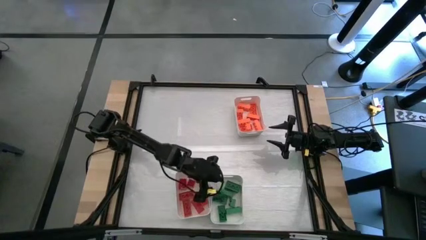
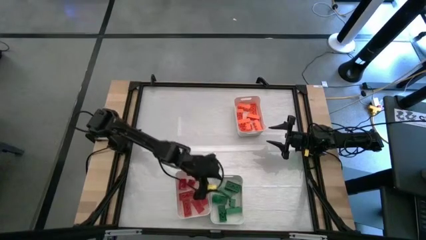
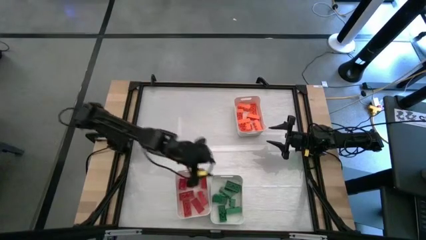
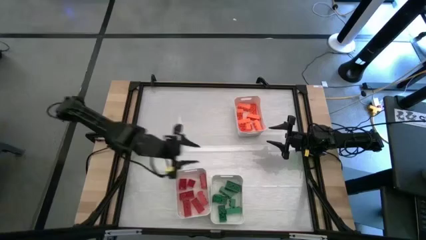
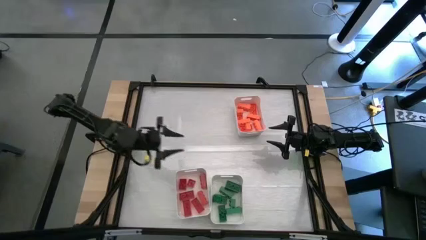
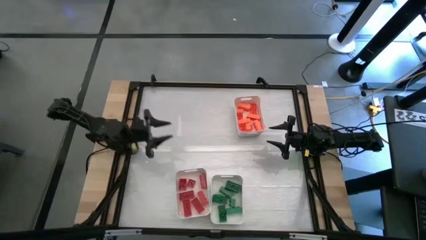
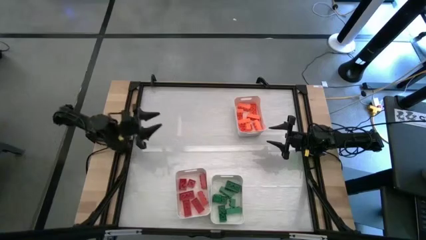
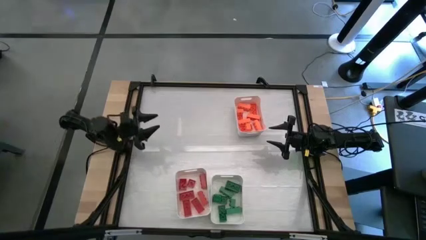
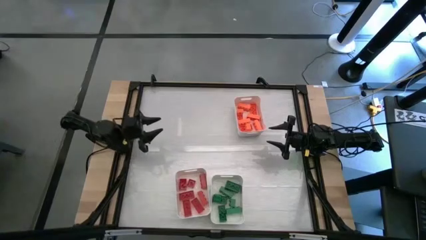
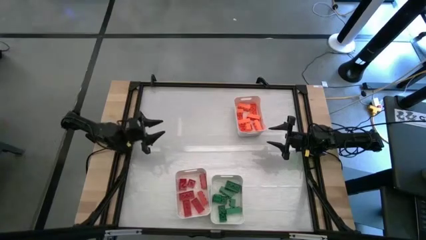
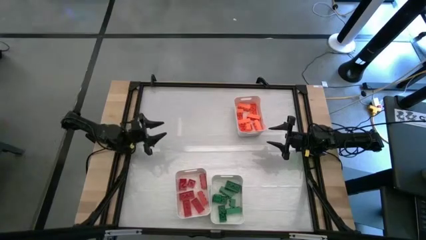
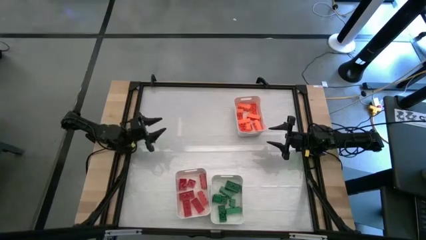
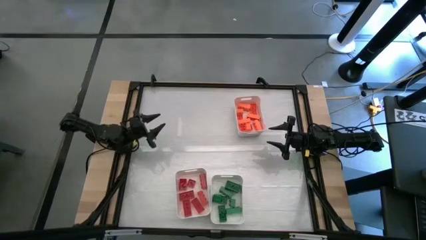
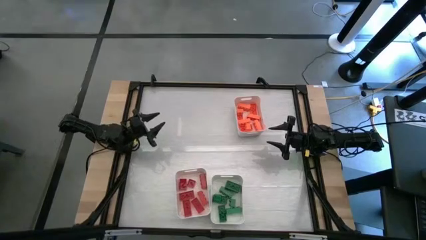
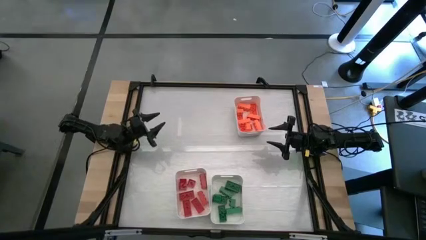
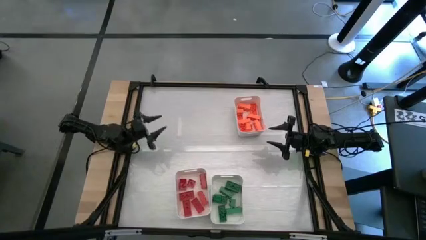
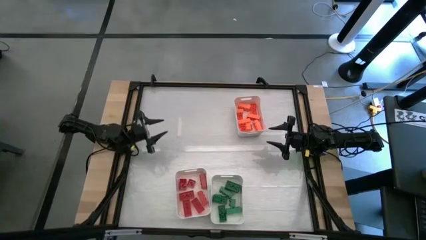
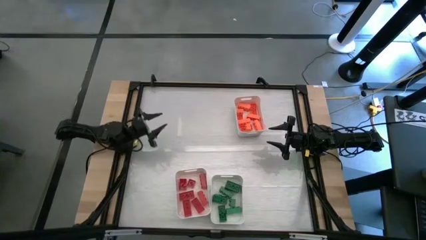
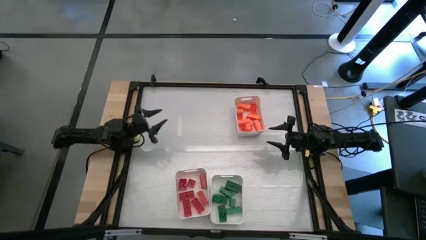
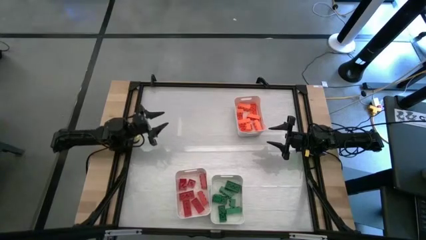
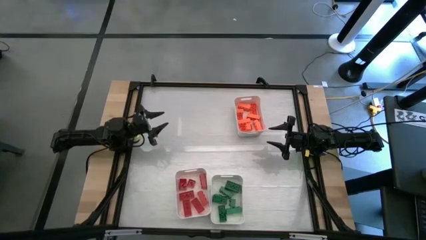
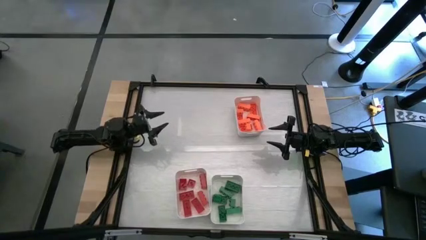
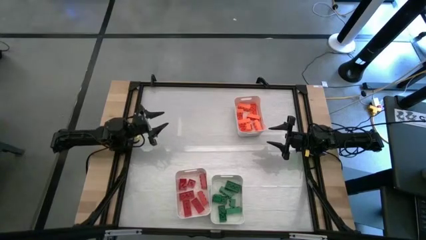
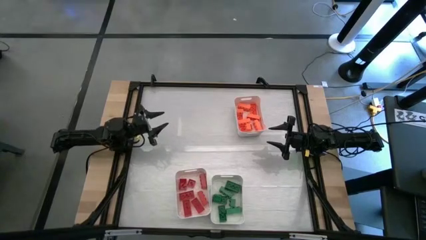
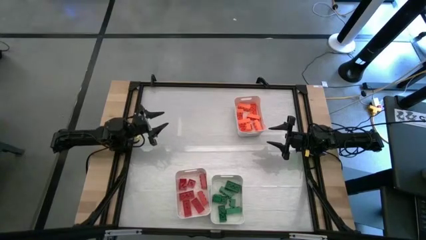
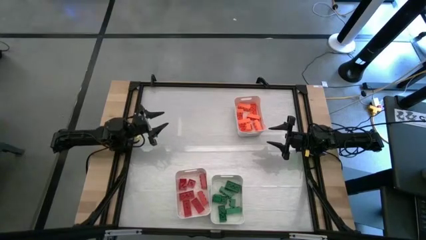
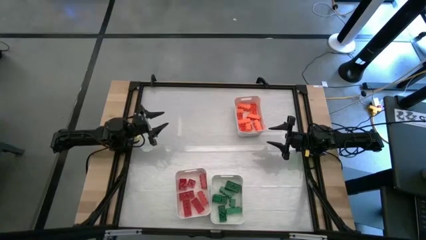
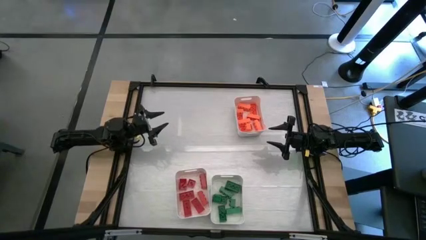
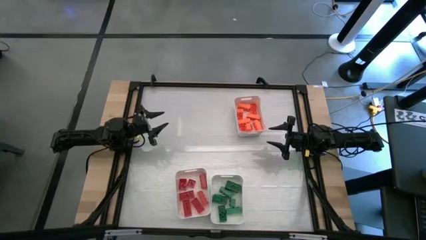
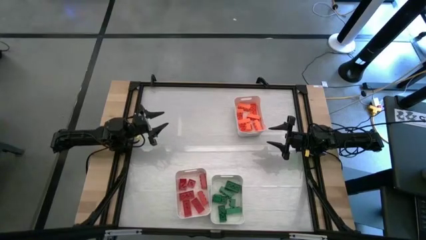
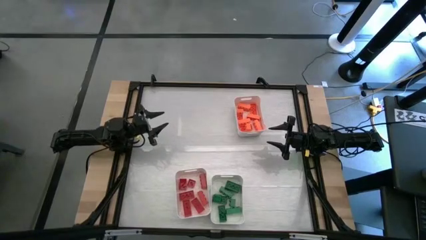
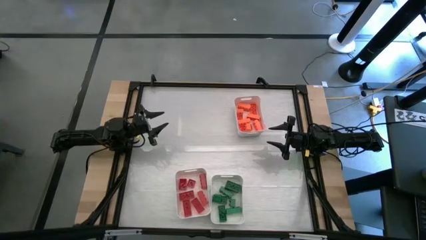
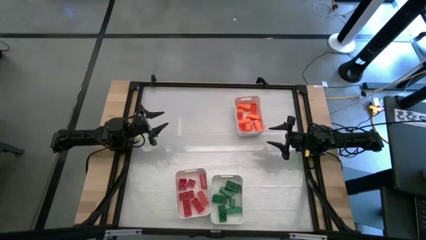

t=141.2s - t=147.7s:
Task: Sort blocks
Return to Home Position

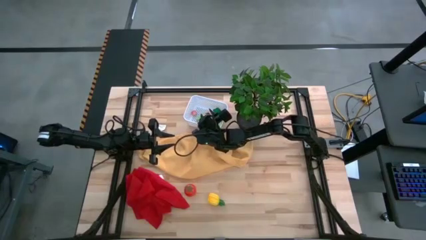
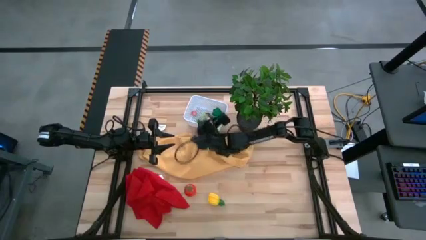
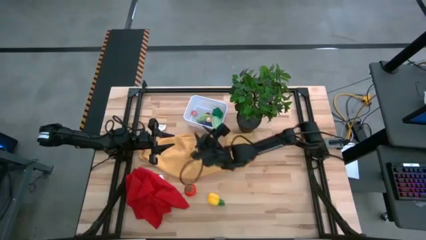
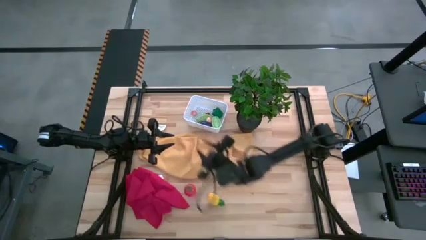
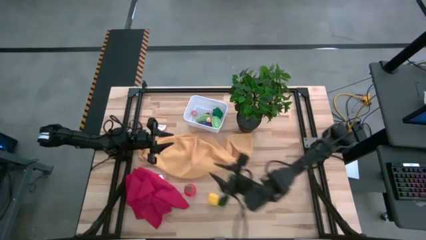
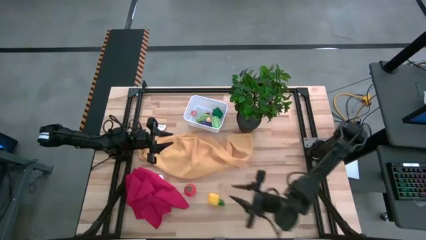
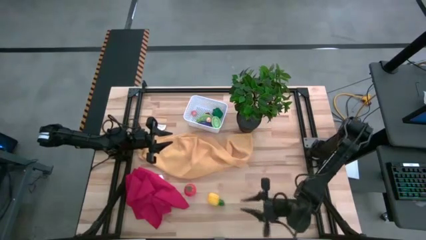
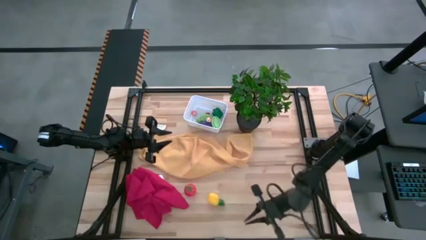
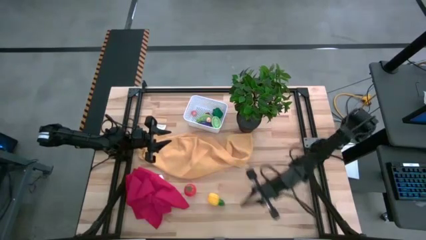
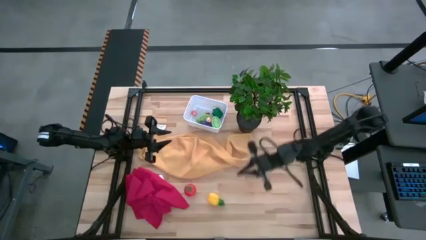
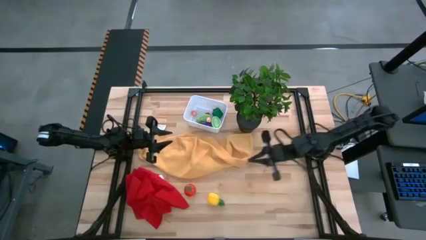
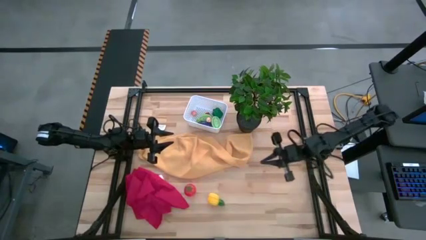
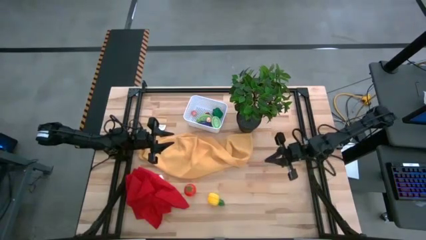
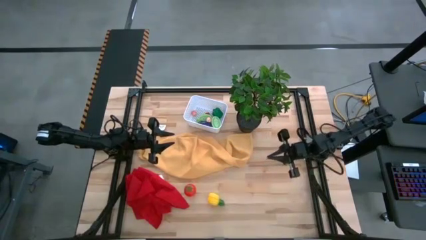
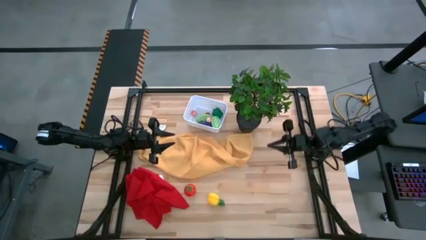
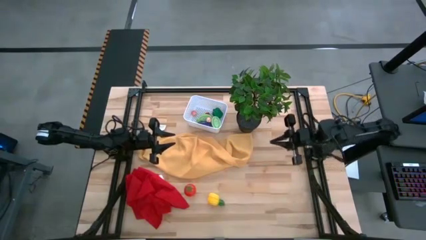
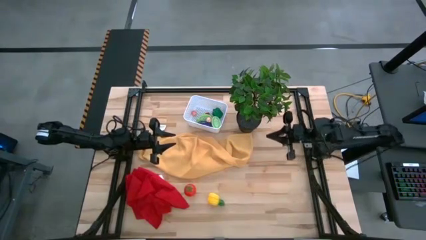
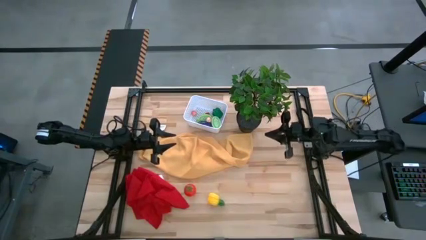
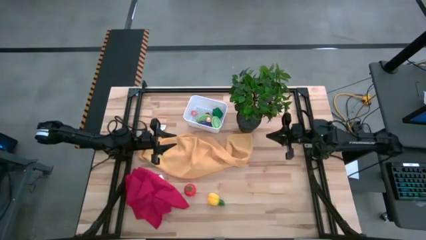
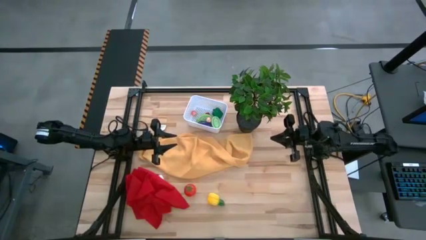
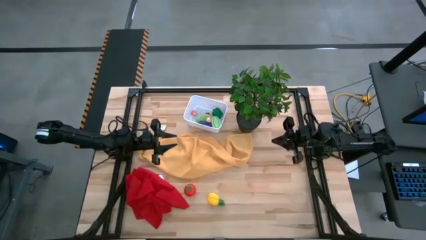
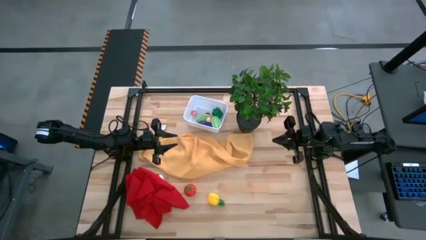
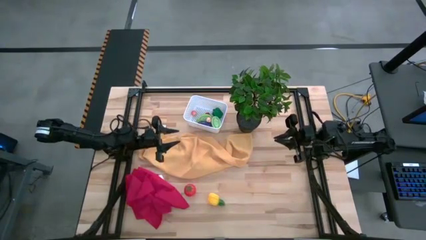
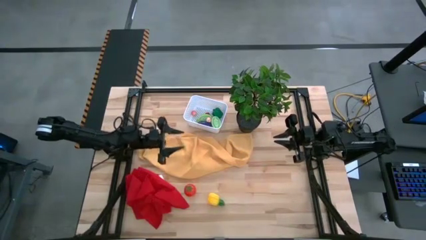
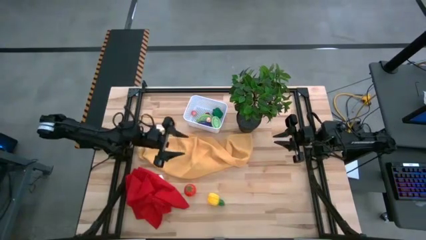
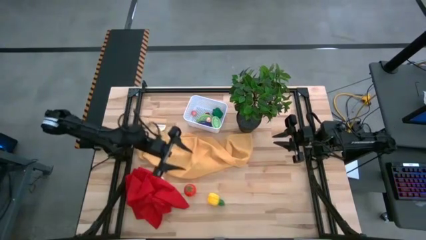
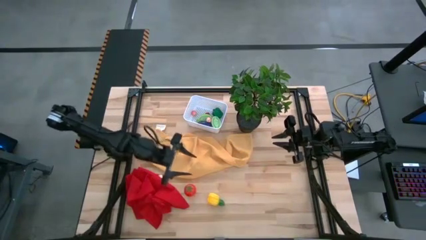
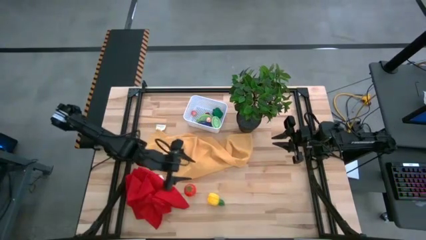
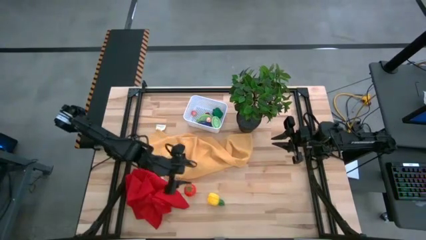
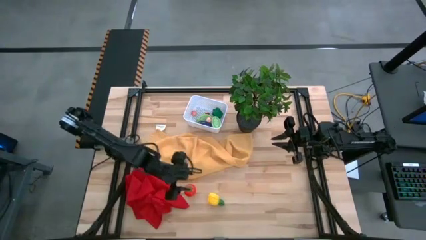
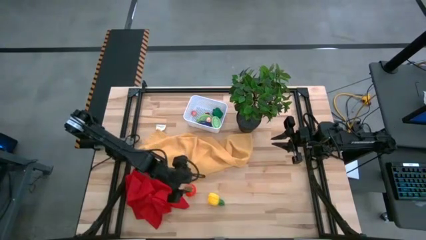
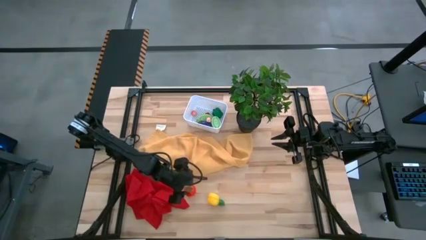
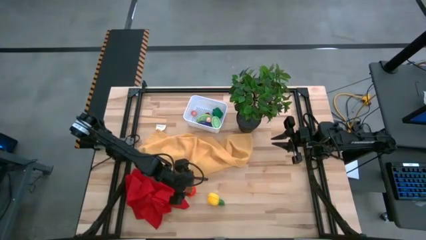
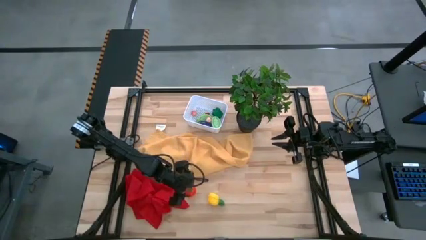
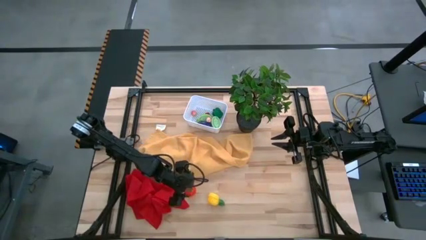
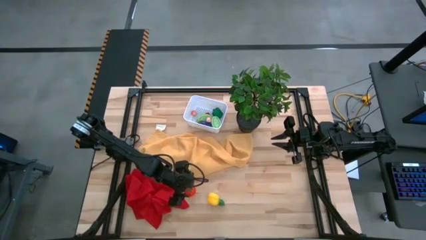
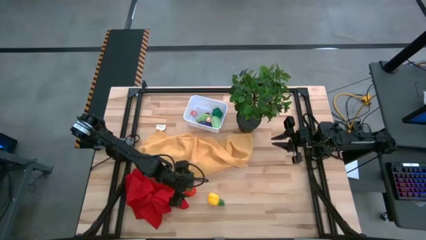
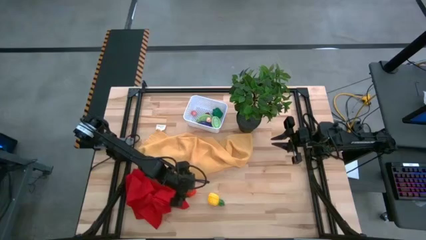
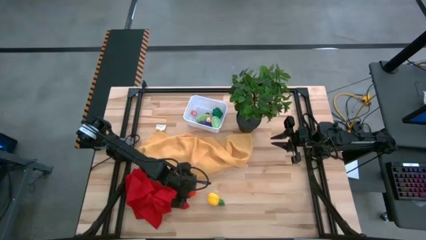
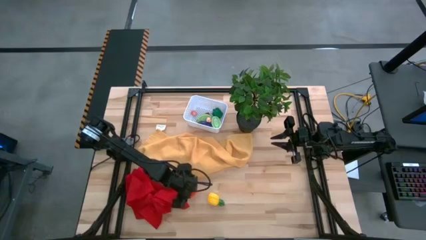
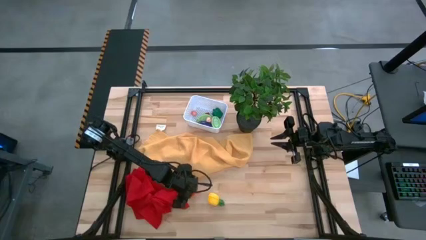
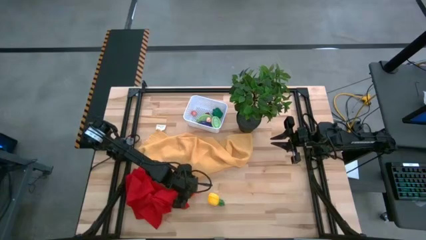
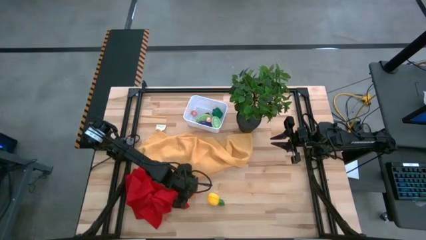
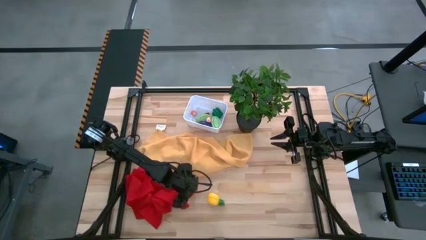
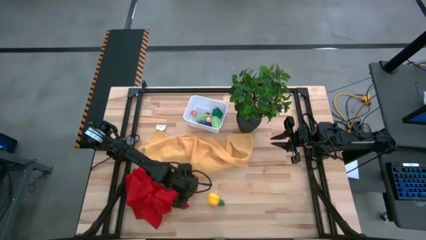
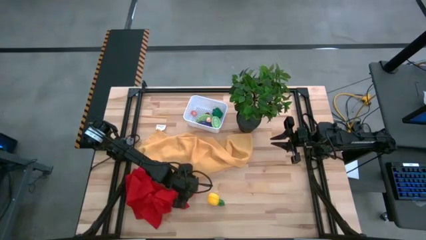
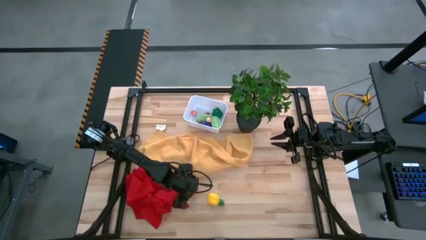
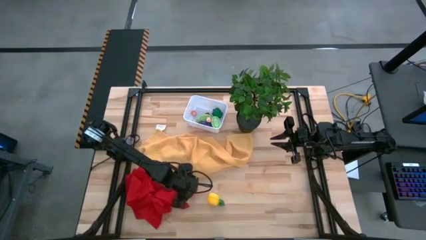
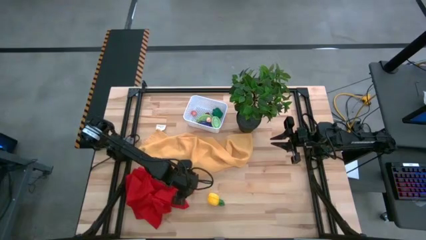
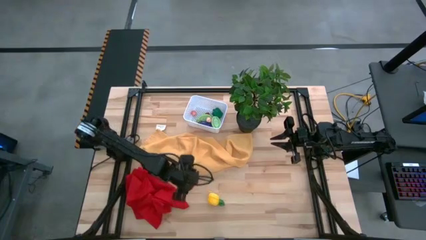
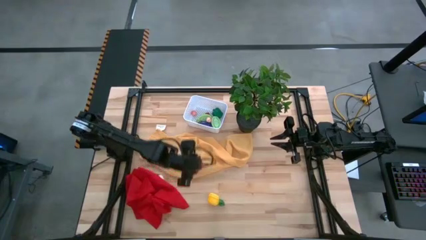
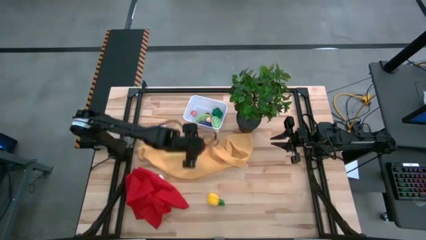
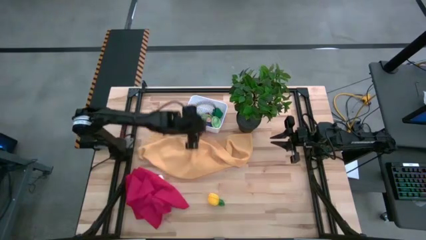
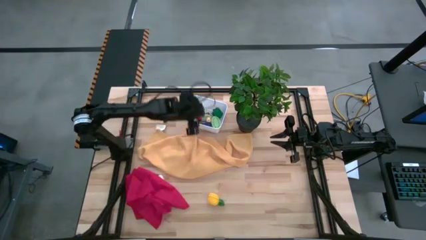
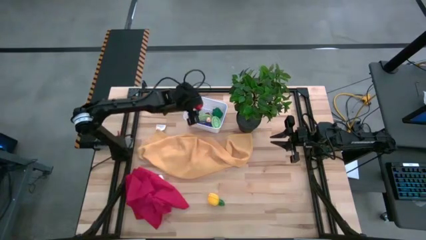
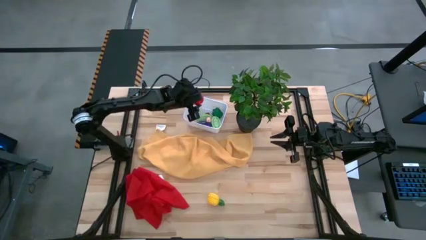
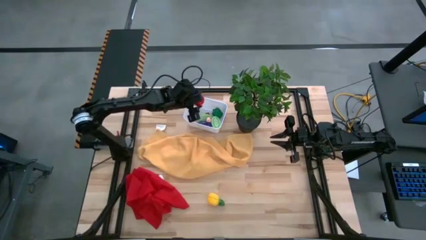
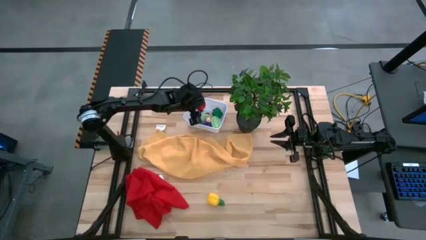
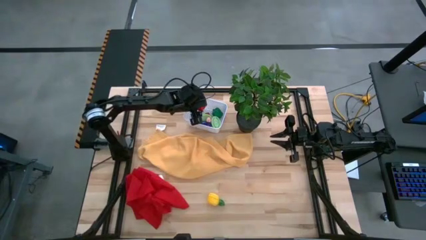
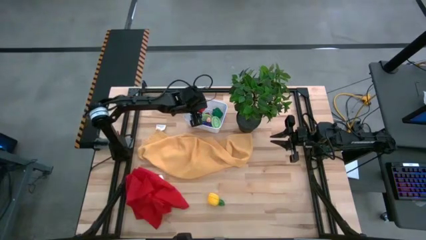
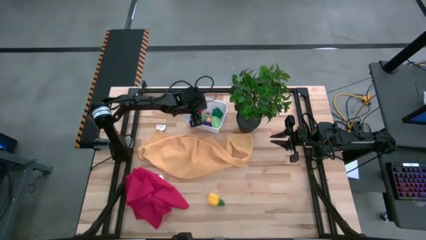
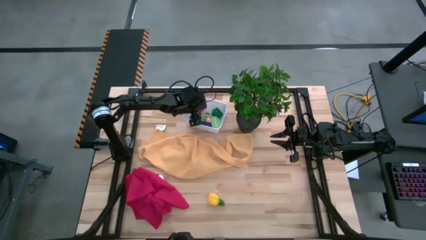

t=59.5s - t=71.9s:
Task: Pick and placing Produce into tupperware
Put the red tomato into the white bin
